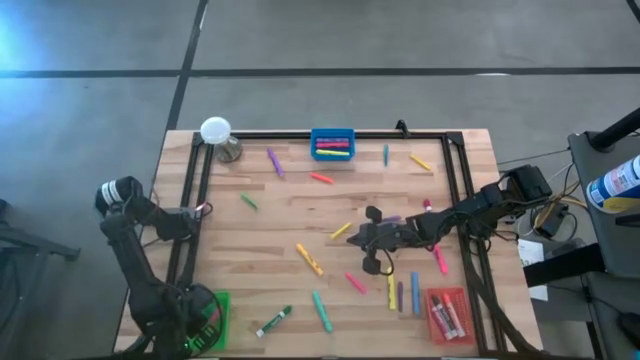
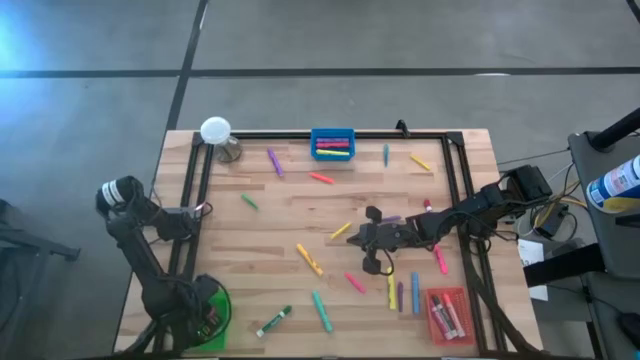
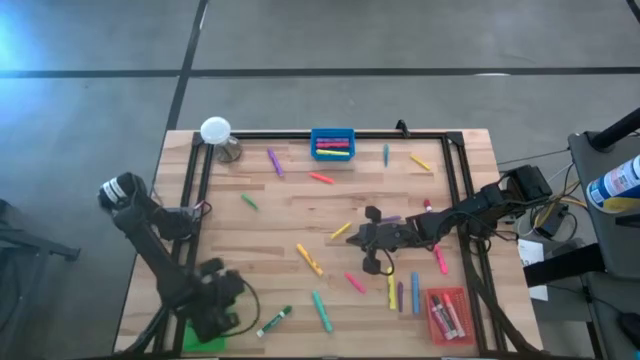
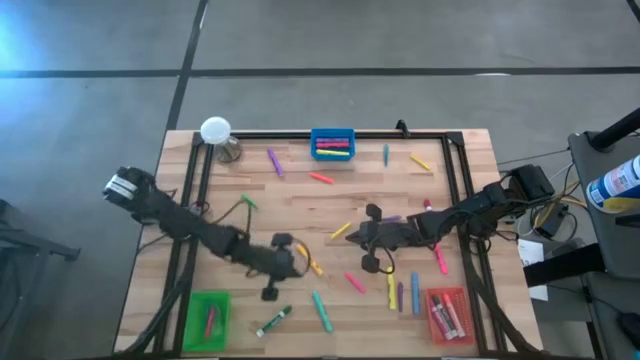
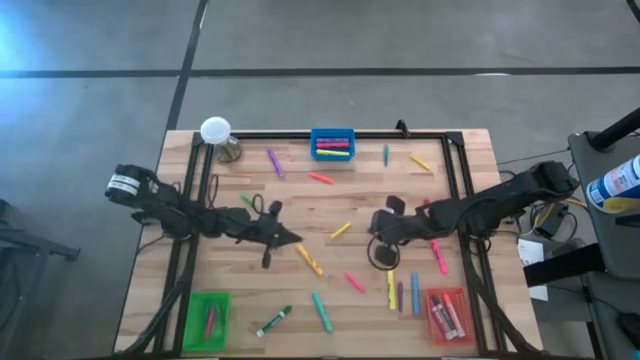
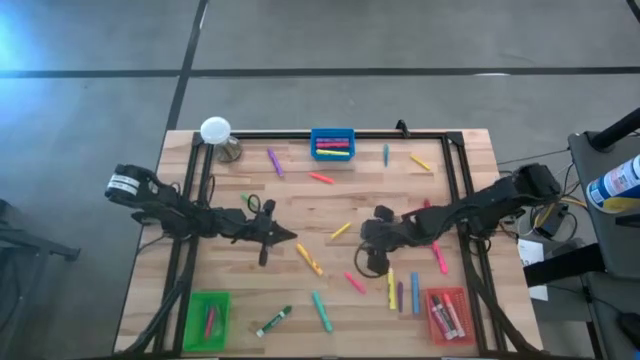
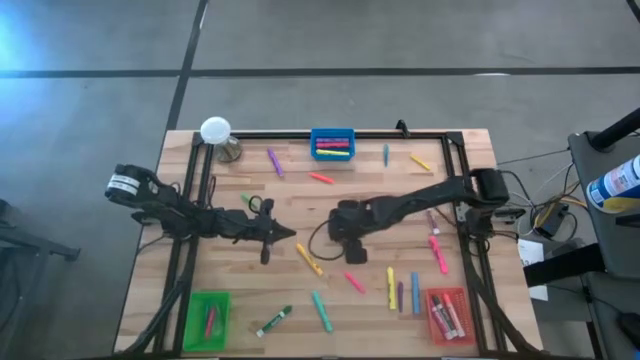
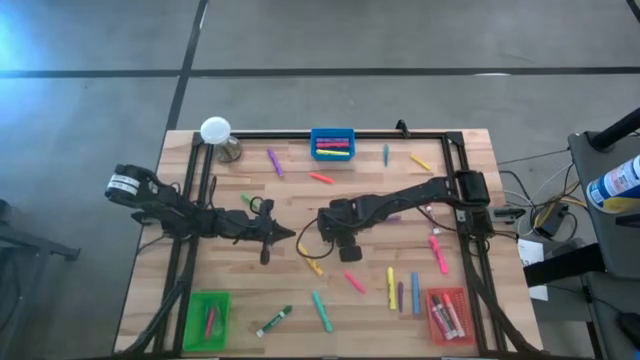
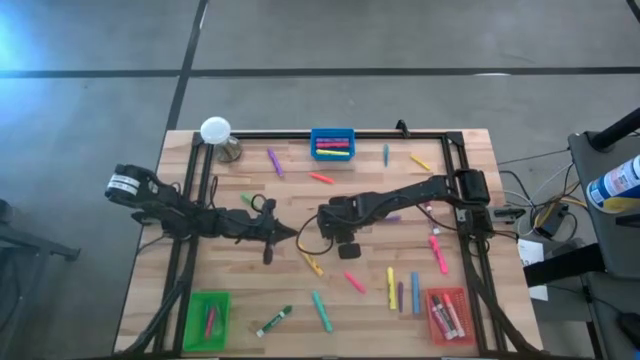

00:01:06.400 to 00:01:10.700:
Task: Pick & Place Markers
Put the left yellow pen into the green bin

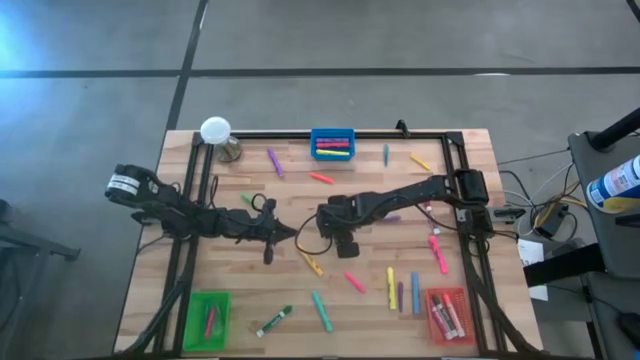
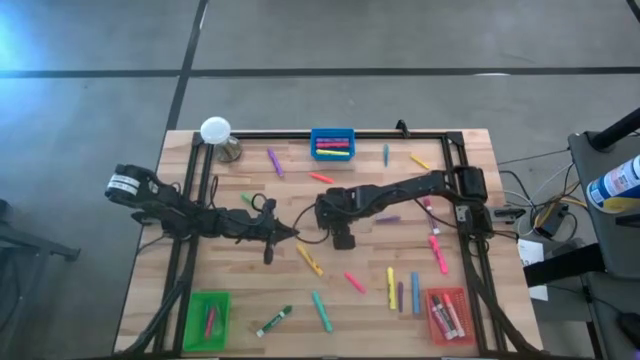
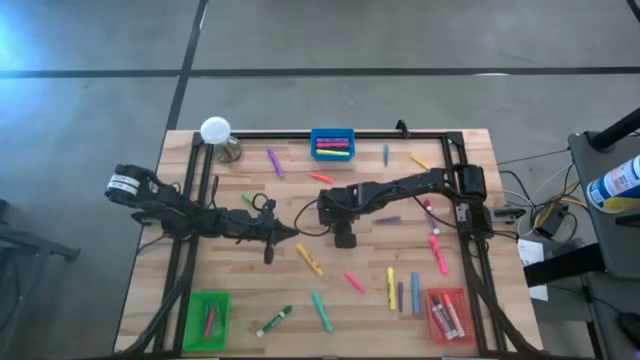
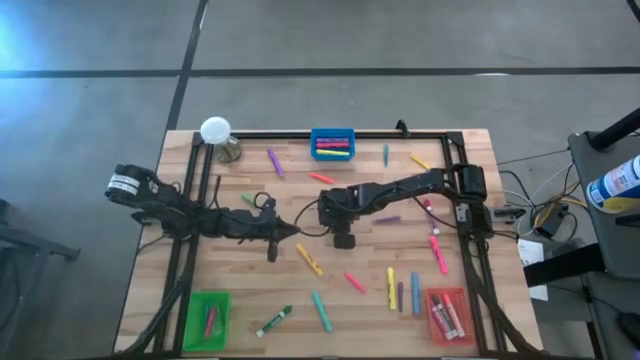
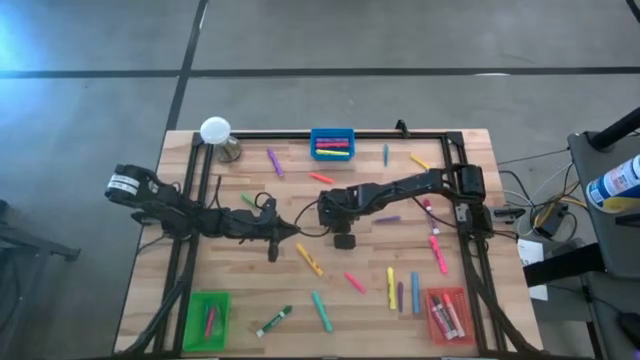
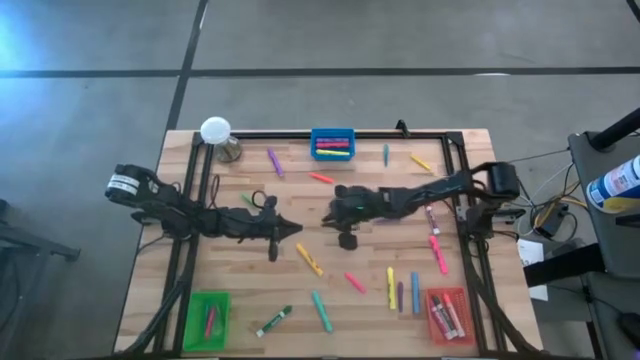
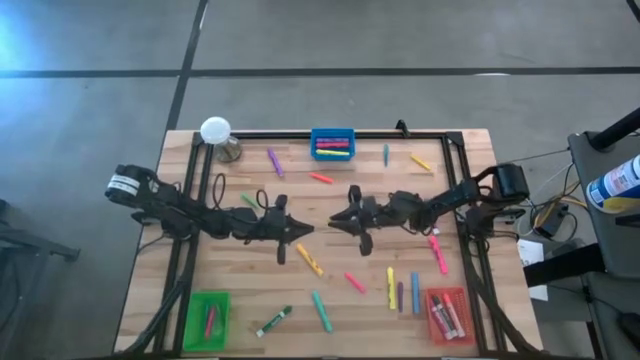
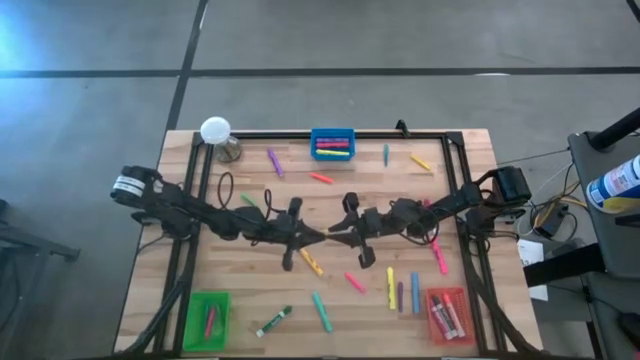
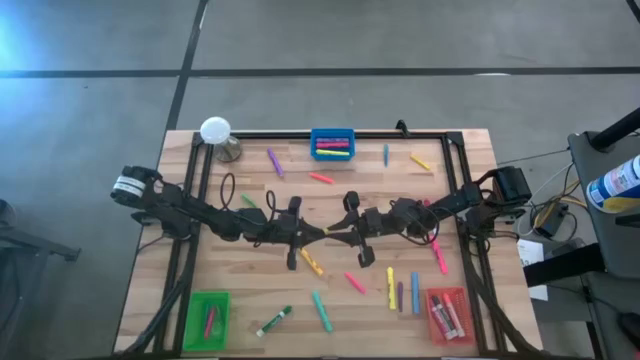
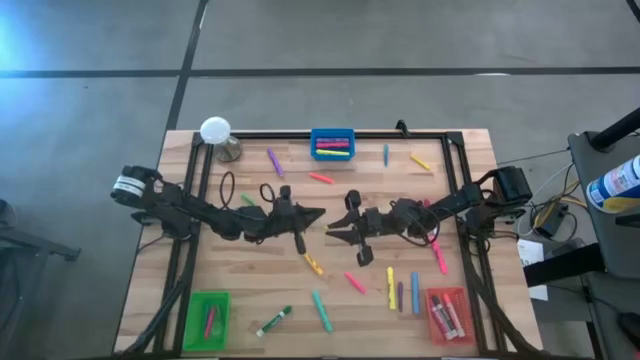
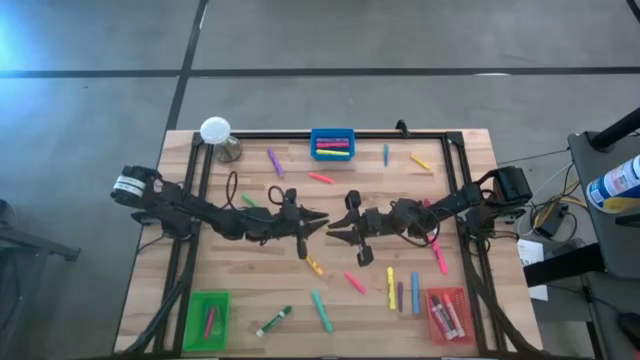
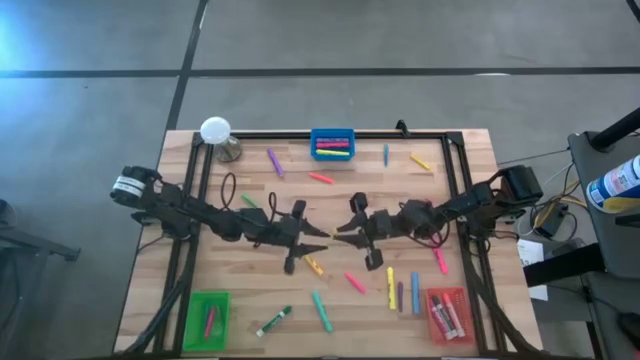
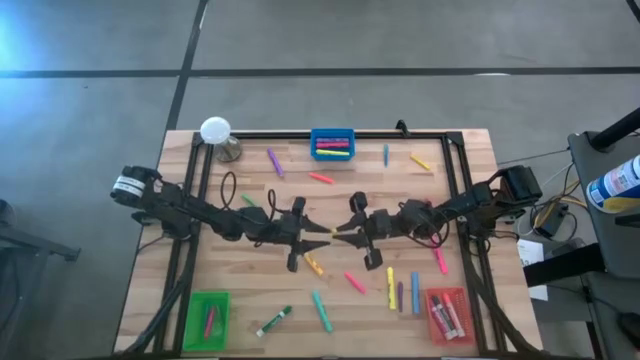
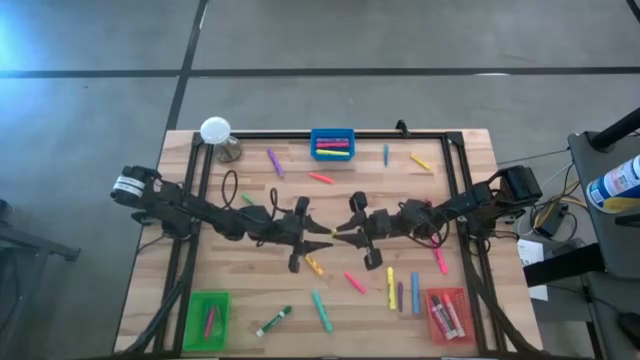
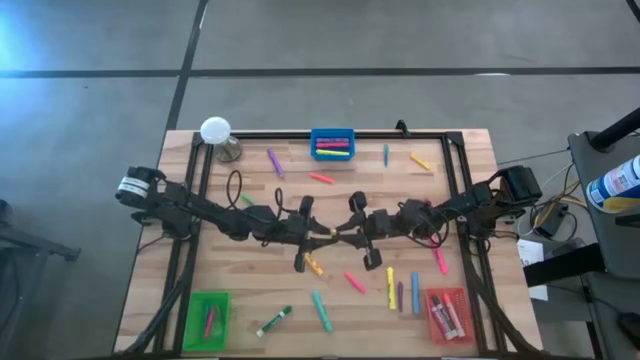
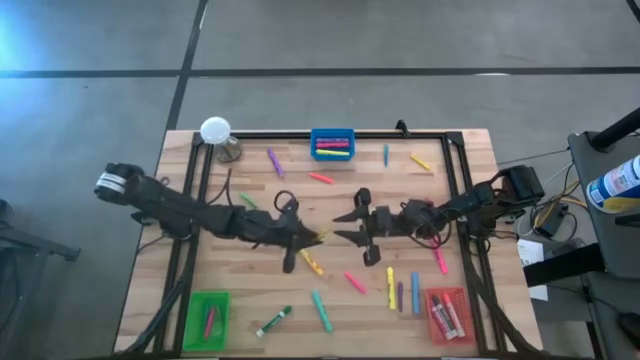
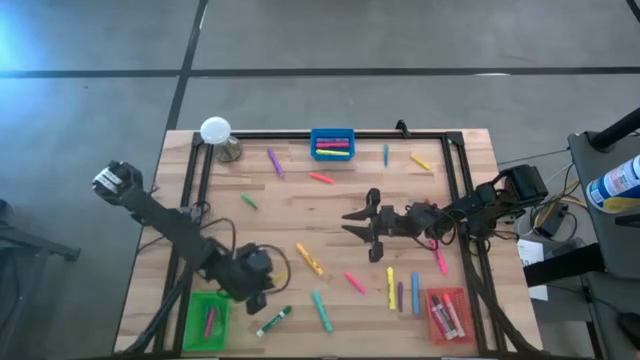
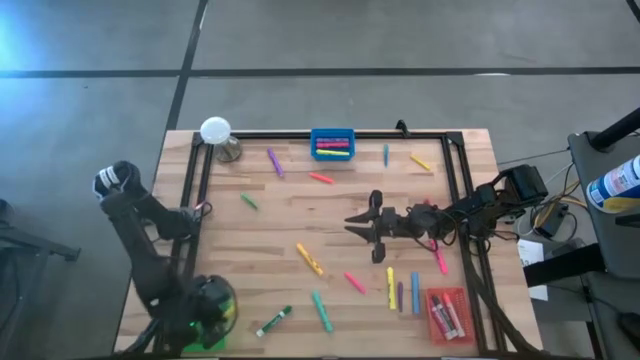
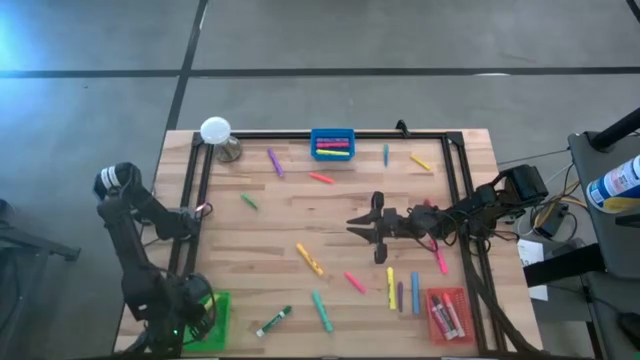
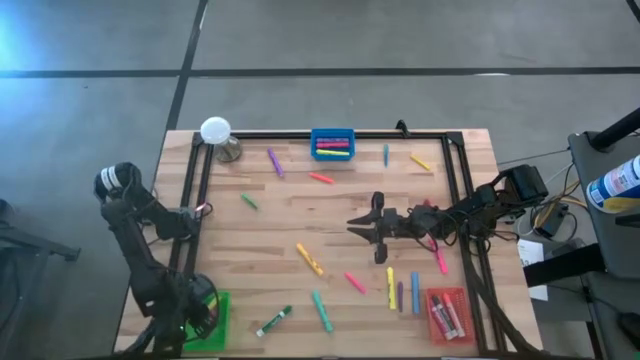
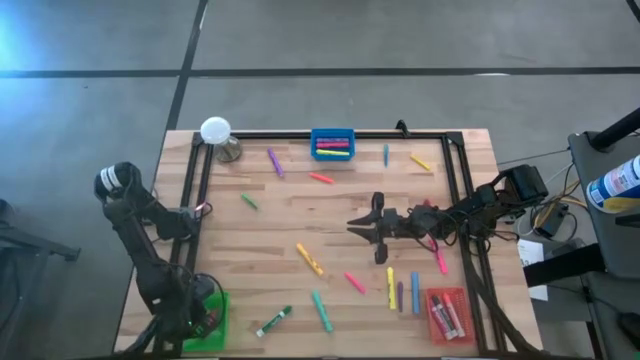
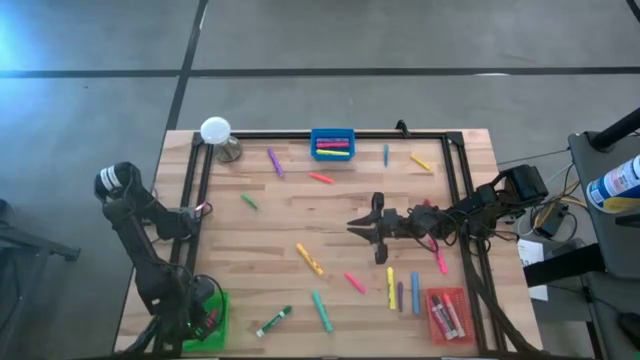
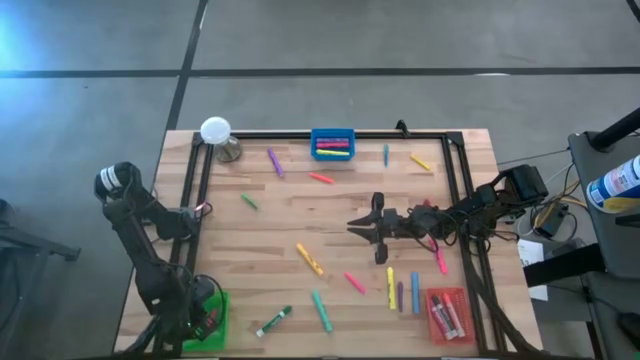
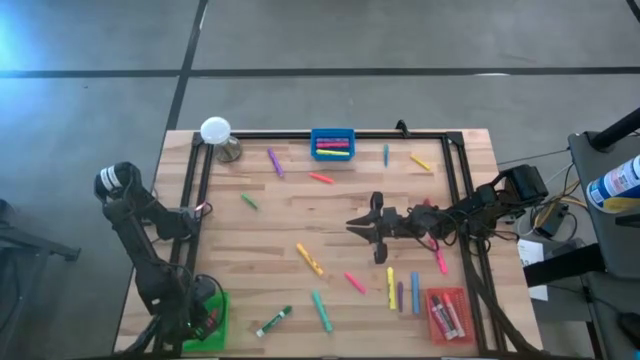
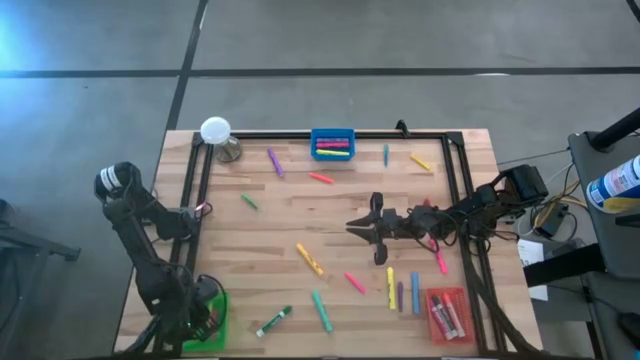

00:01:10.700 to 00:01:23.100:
Put the left yellow pen into the green bin

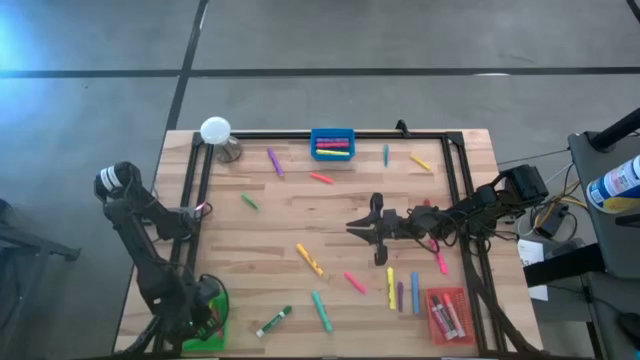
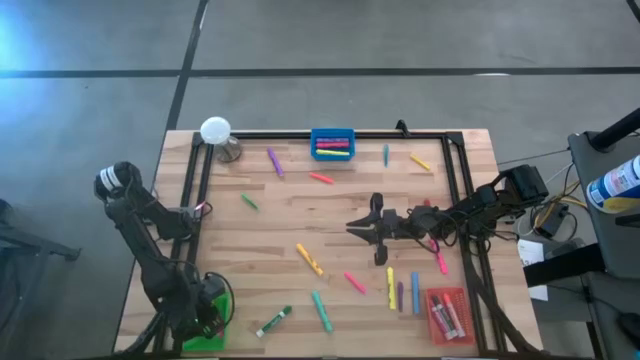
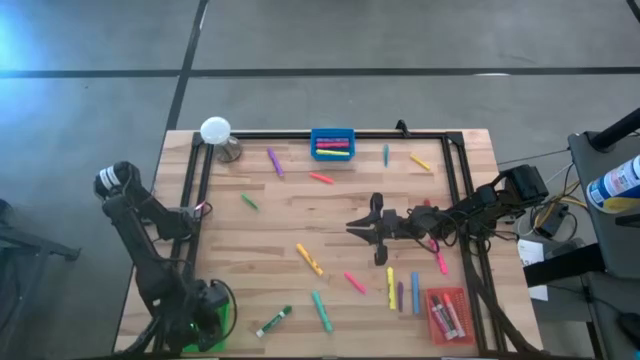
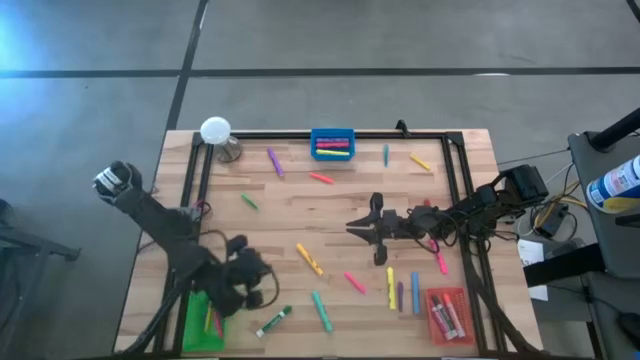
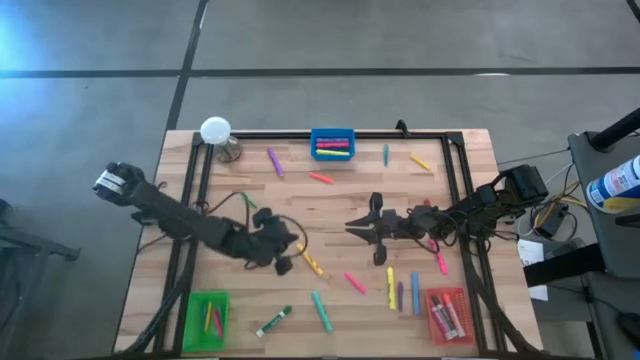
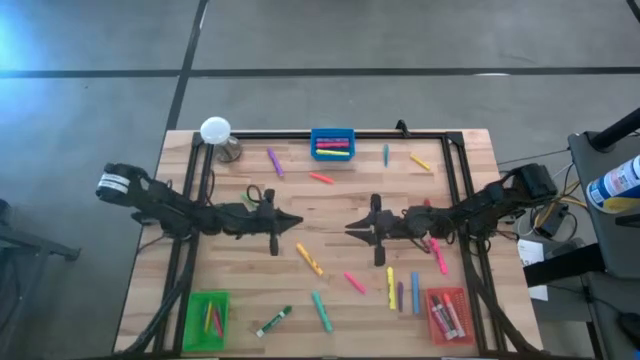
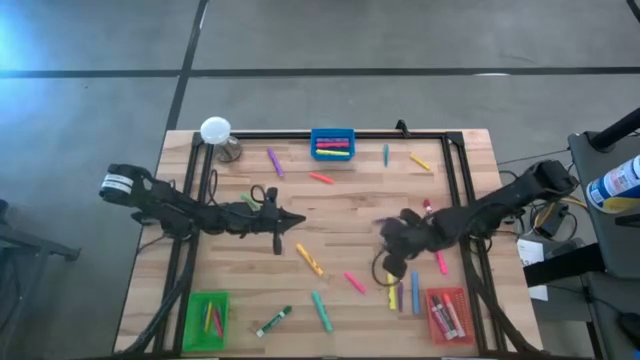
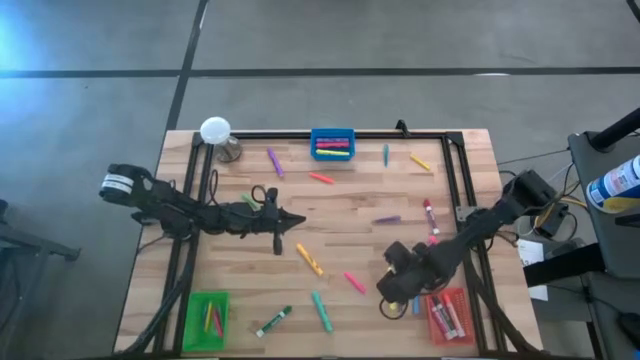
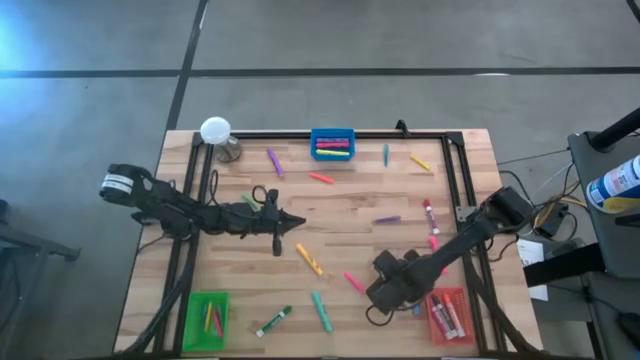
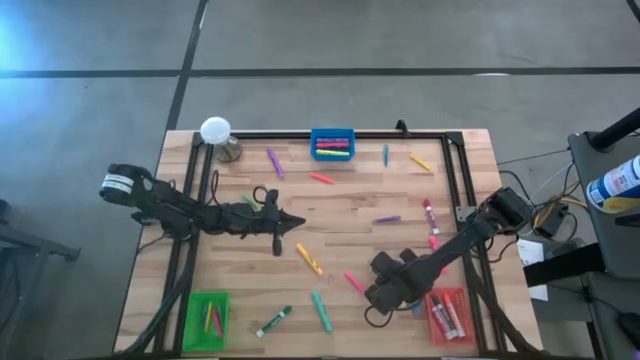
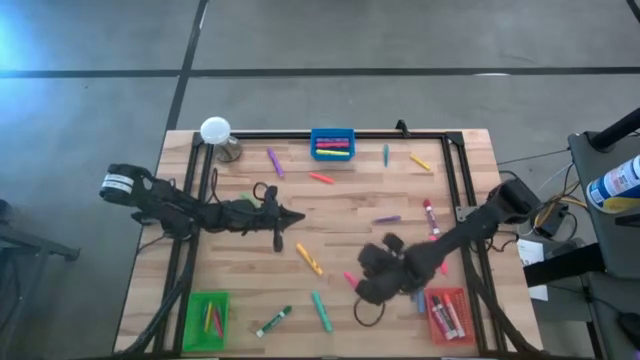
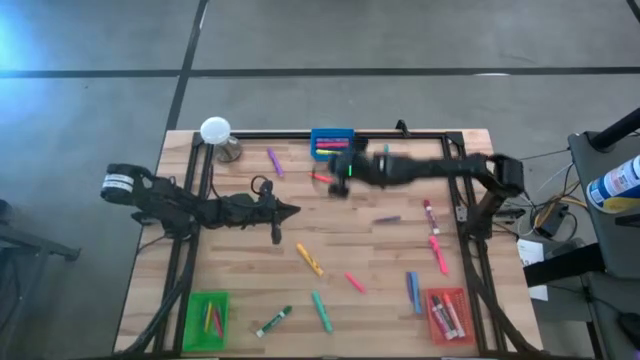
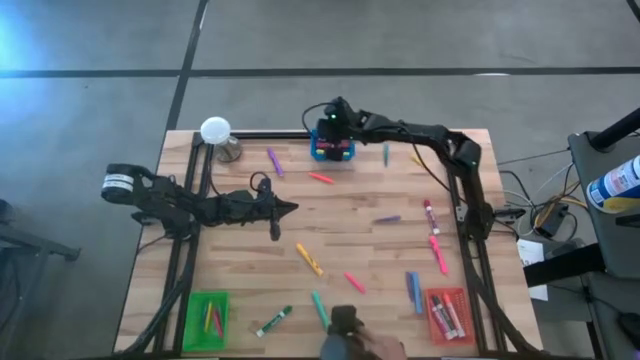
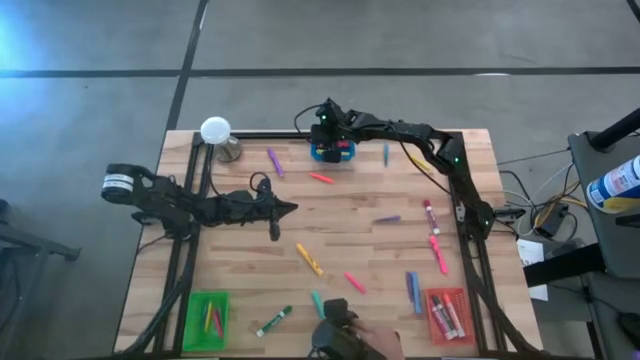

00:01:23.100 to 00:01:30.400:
Put the right yellow highlighter into the blue bin
